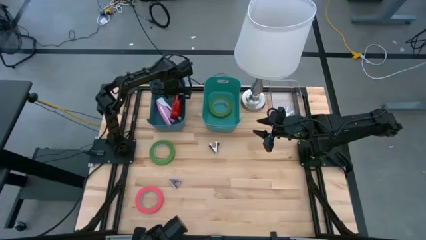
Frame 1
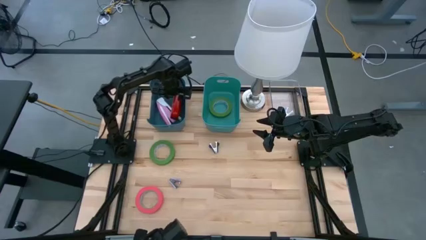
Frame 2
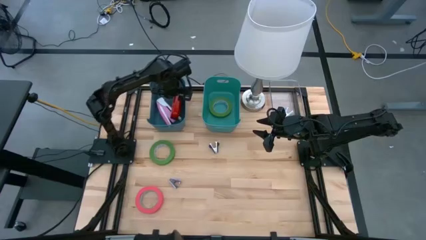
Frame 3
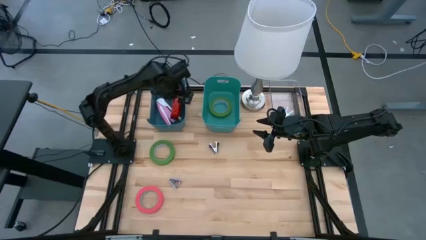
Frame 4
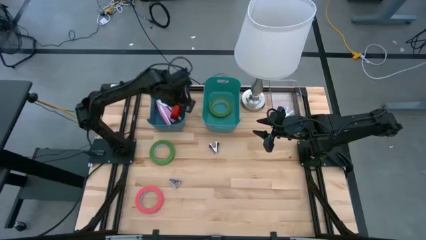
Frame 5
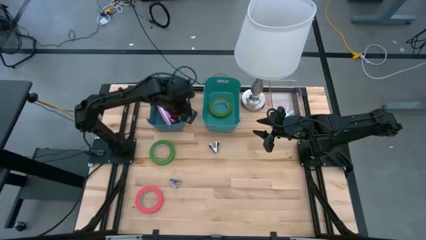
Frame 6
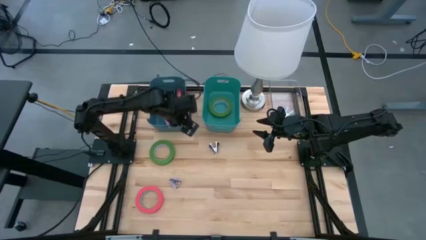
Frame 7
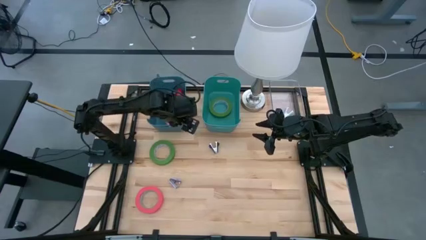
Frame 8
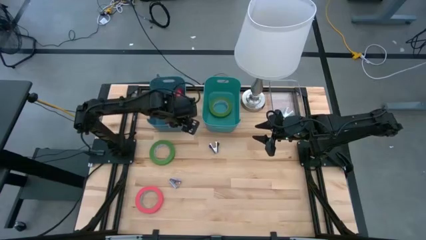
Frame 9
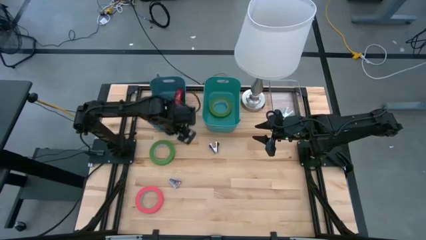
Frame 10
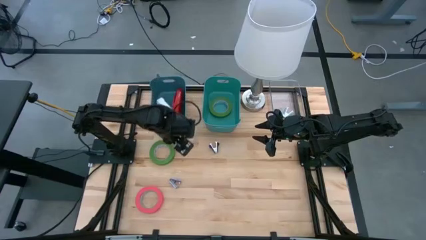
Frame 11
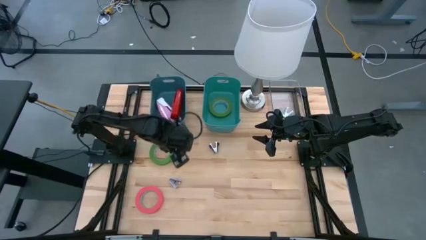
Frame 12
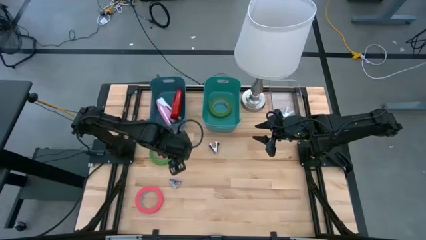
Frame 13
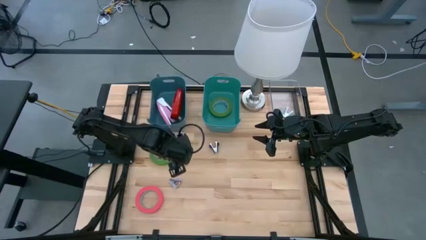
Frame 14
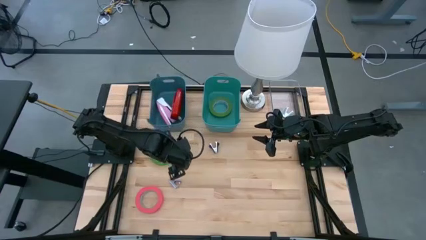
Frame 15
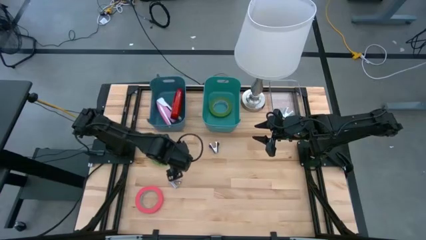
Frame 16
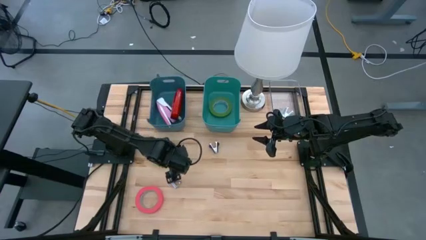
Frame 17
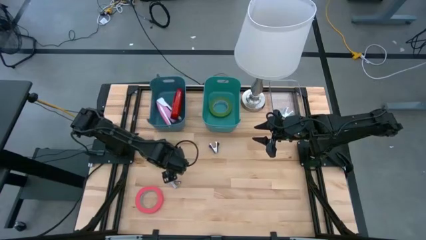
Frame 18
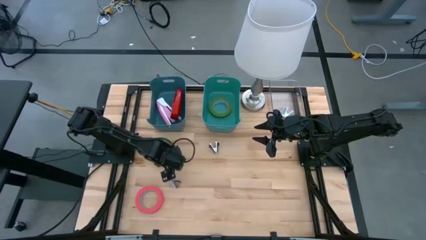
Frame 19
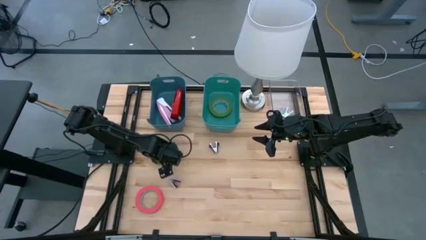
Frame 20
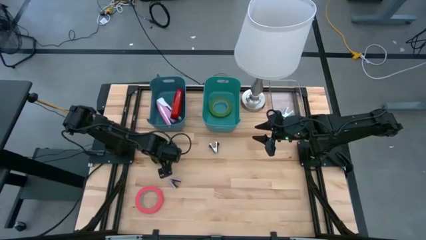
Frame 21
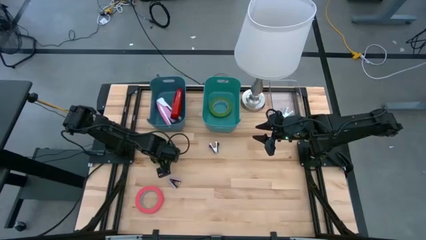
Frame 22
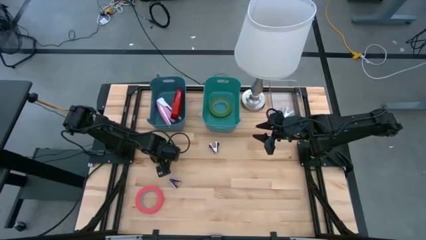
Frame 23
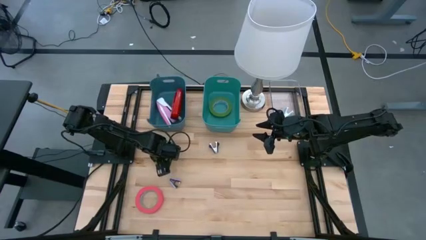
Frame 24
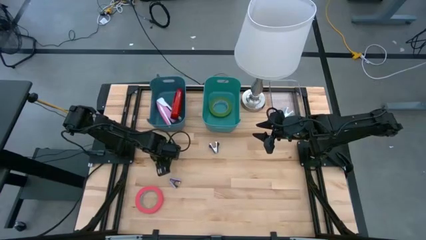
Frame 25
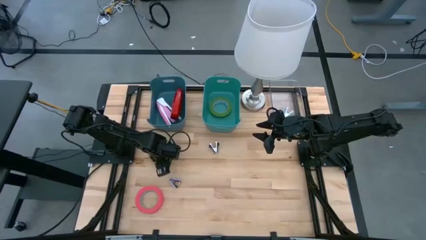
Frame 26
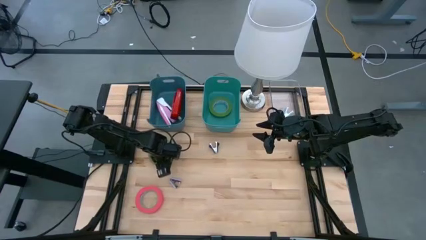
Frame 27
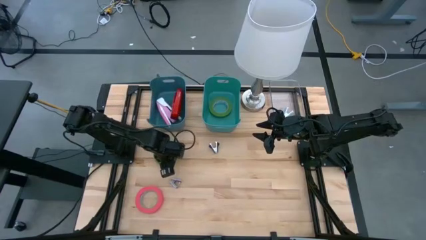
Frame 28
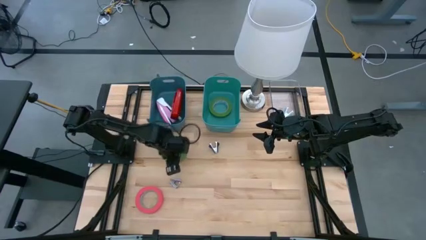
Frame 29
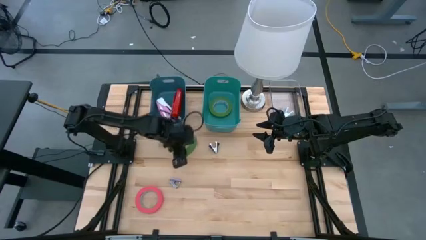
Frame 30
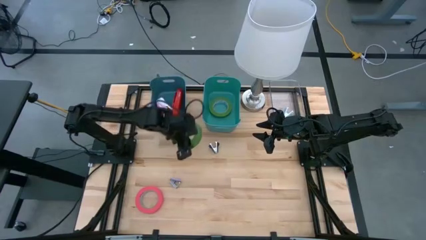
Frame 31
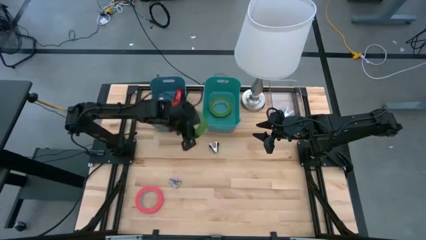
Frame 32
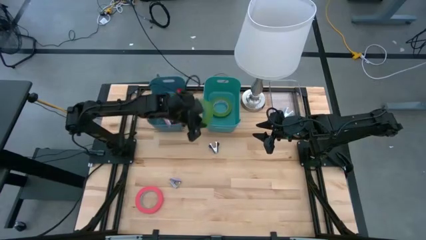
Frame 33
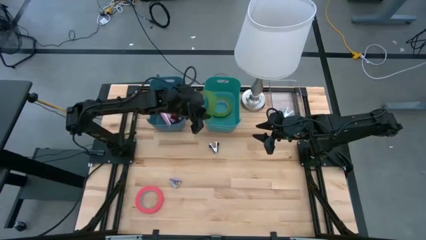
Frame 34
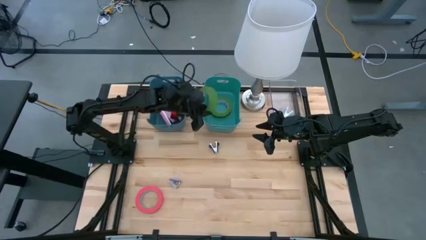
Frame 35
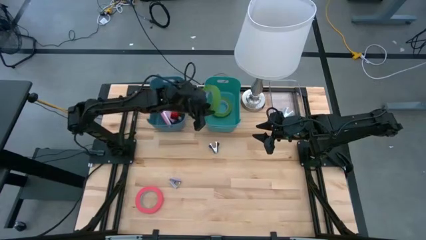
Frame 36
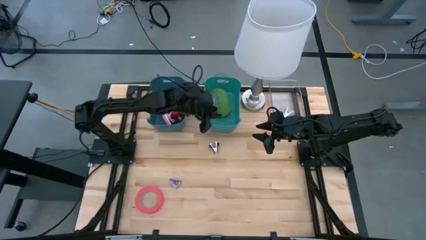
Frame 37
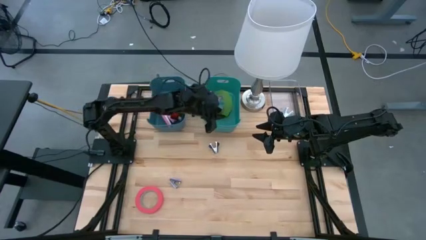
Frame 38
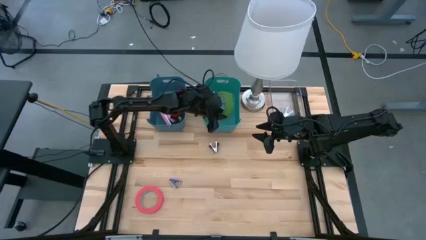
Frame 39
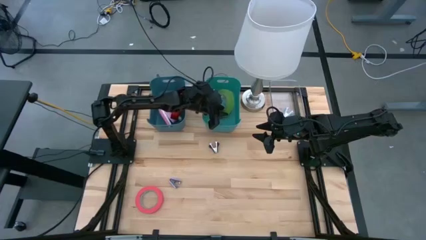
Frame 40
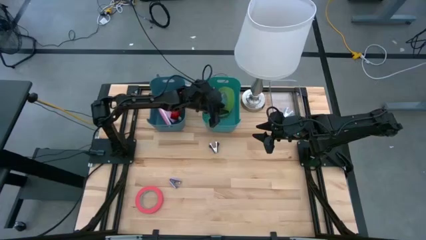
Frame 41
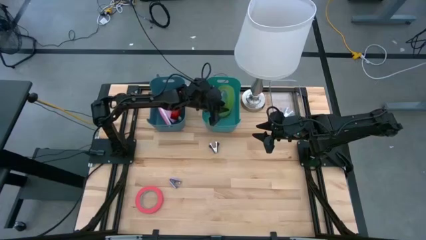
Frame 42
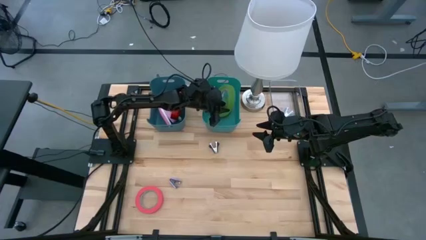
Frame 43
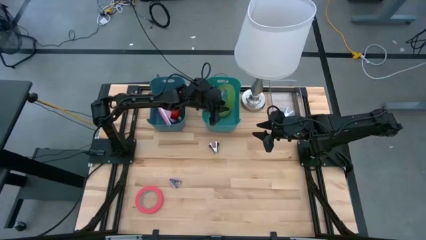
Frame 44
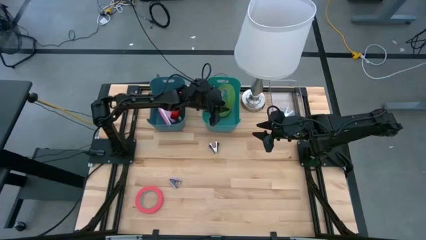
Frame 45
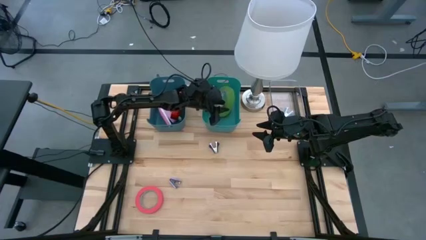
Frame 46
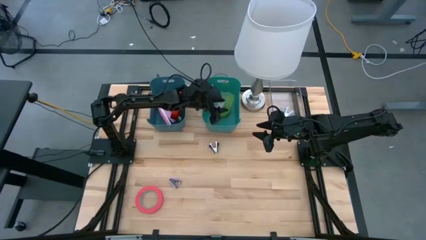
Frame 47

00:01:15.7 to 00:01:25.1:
Task: Pick and place Stapler, Stapler remover, tape
Put the green tape into the green bin

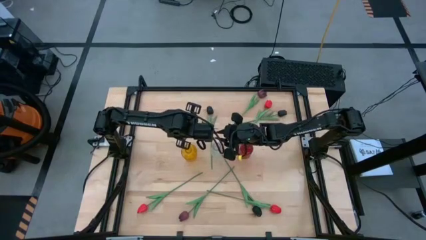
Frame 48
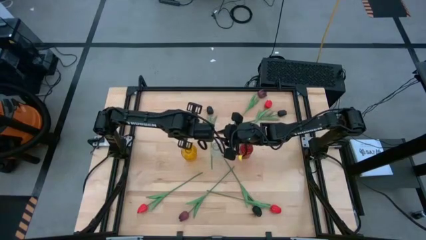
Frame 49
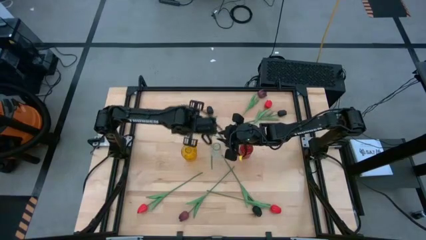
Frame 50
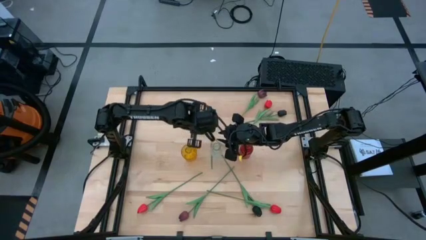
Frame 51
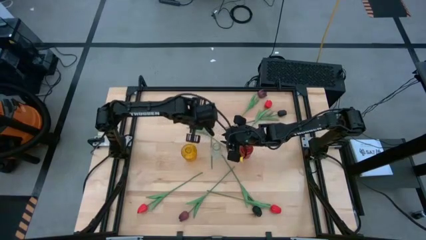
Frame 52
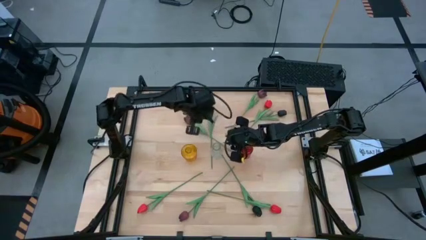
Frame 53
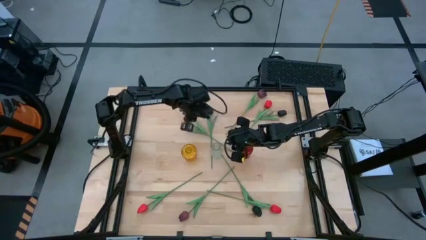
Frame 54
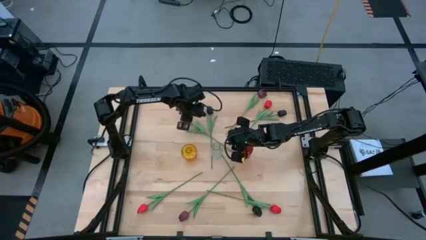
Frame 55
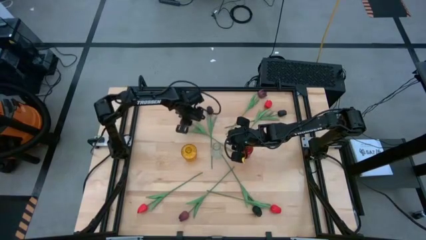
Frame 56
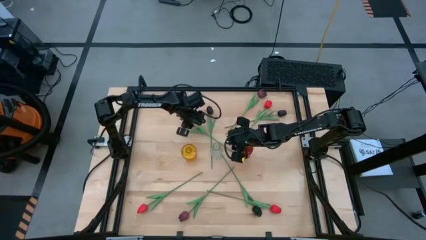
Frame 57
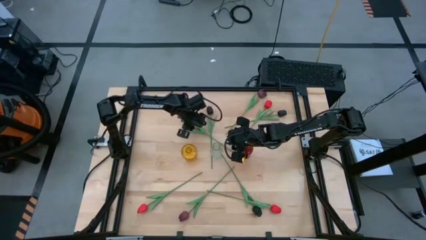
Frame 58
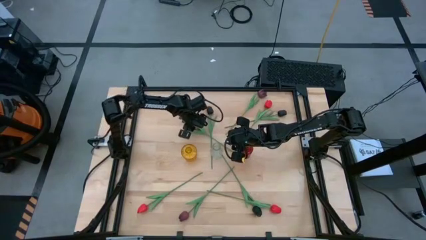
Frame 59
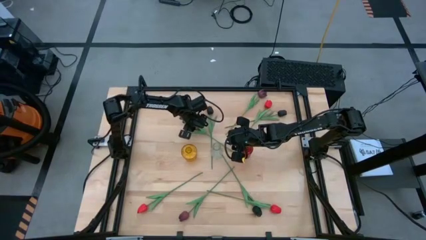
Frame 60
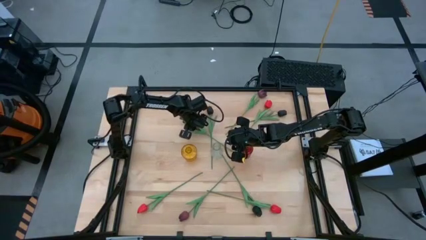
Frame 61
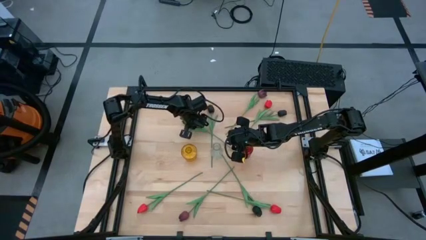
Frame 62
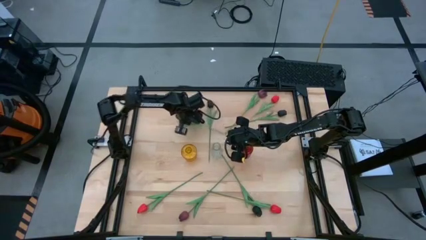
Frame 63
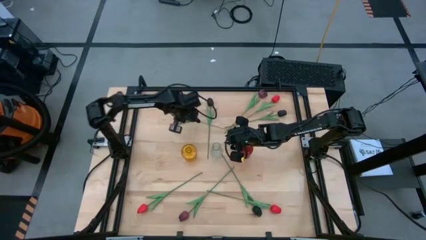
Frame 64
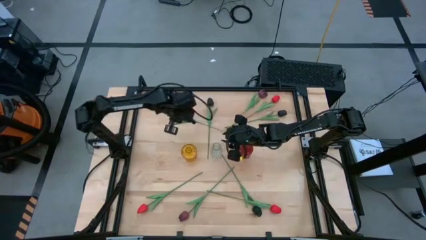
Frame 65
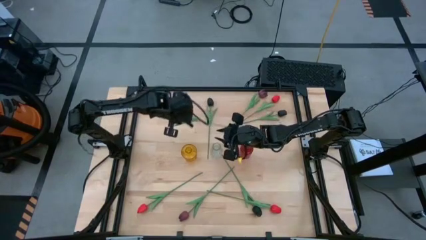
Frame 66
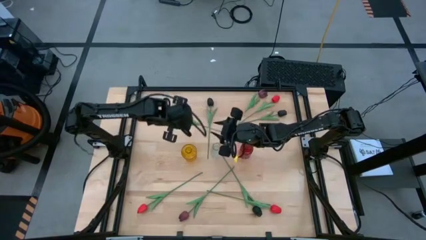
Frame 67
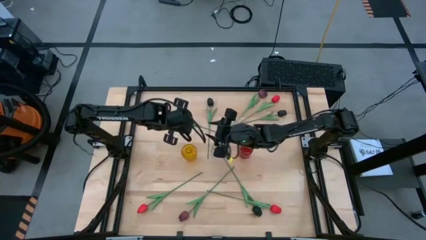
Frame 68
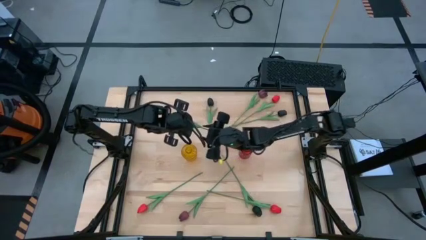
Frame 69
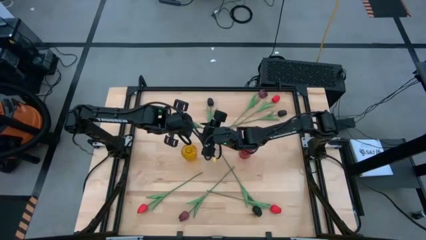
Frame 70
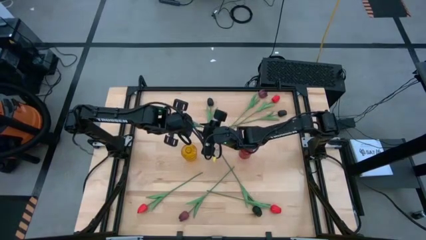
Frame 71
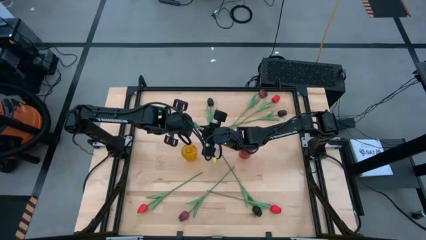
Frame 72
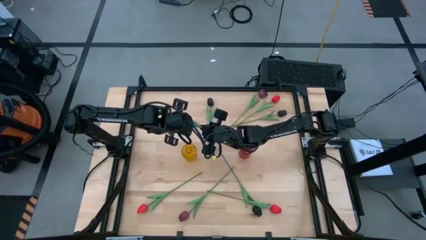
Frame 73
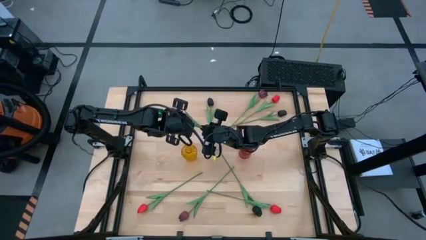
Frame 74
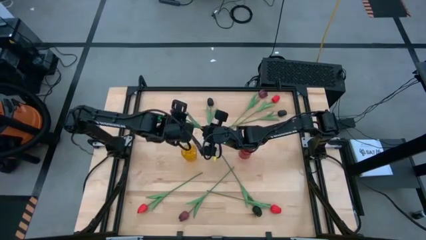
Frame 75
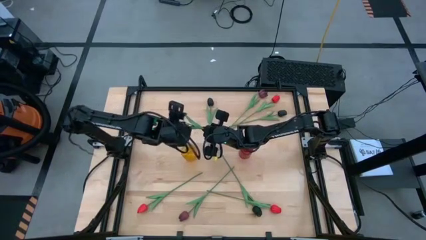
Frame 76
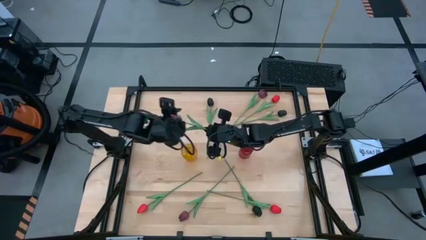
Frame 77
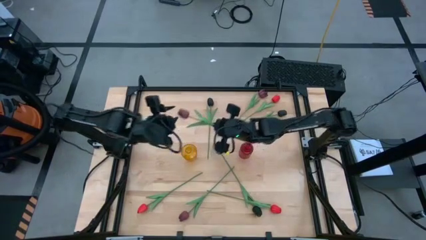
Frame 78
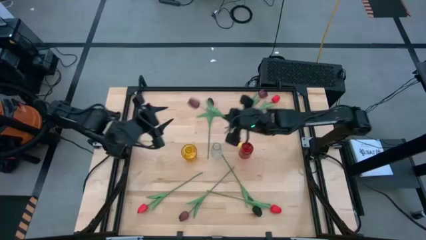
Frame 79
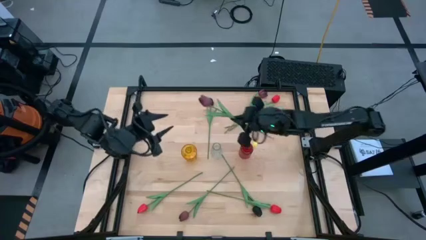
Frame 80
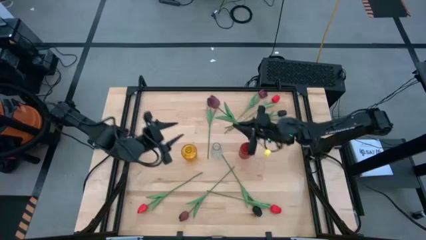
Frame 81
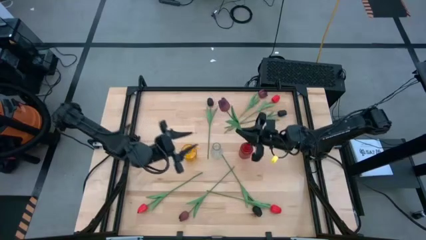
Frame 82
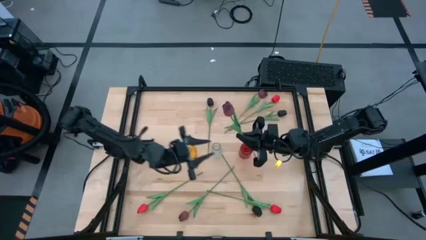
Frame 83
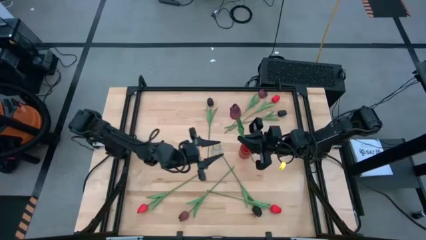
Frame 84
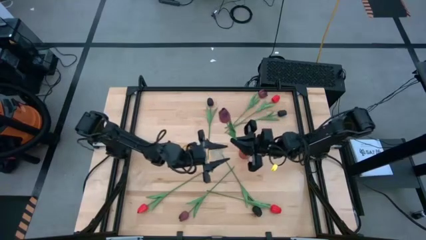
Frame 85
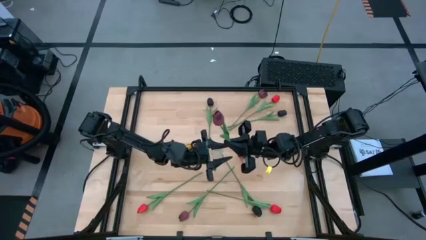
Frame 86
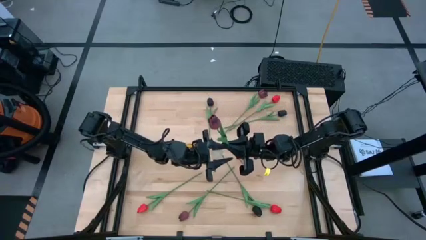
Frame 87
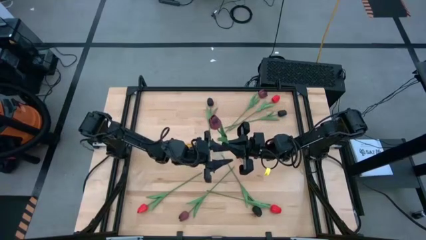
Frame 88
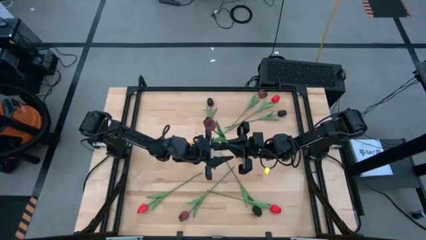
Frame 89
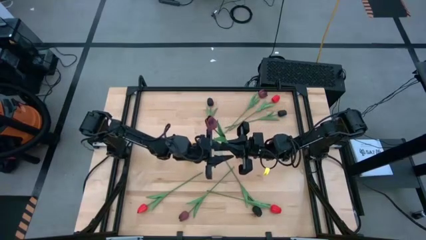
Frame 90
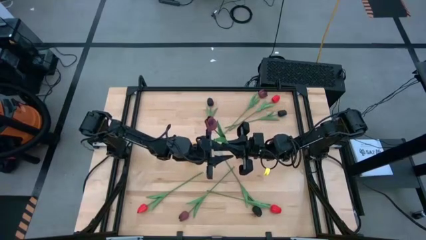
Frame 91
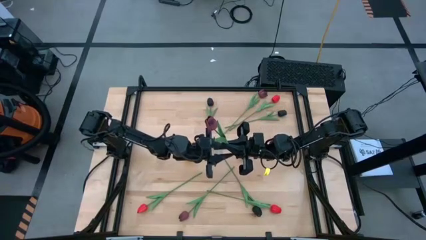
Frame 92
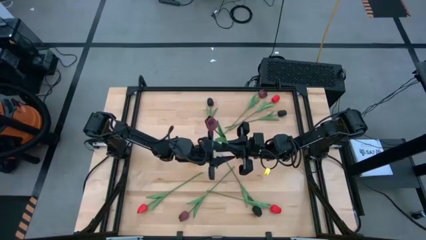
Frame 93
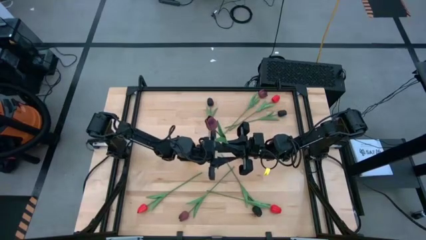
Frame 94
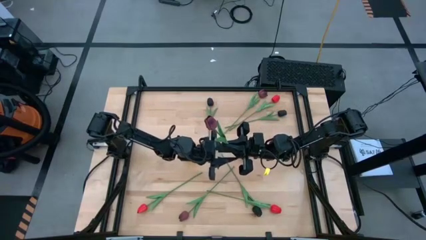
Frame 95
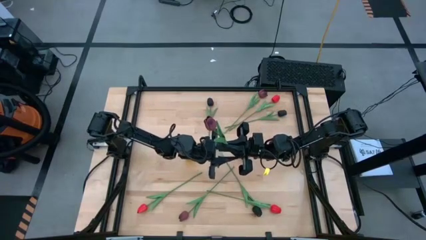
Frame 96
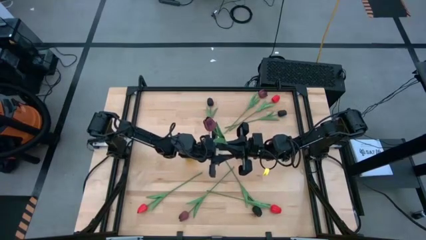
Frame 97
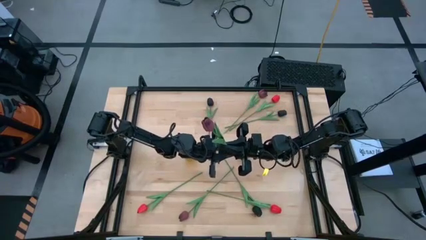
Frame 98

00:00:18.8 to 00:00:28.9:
Task: Sort flowers into vase by color
Put the top left red tulip into the yellow vase
